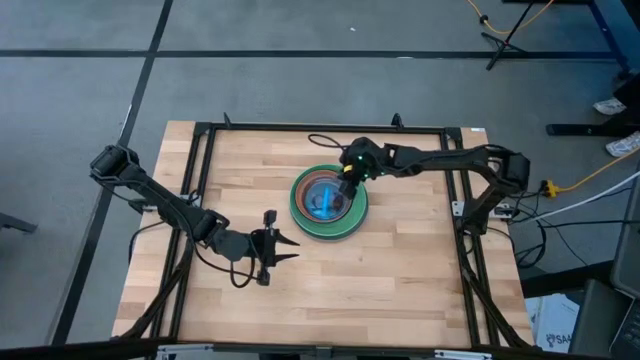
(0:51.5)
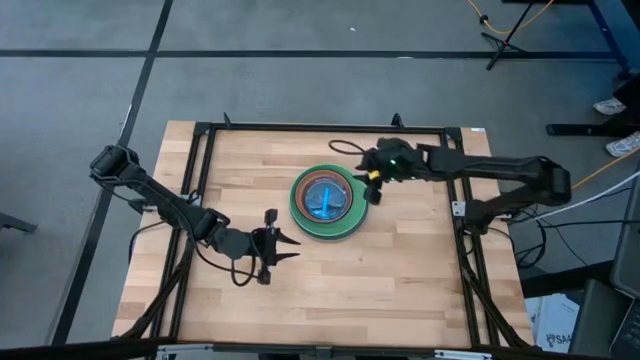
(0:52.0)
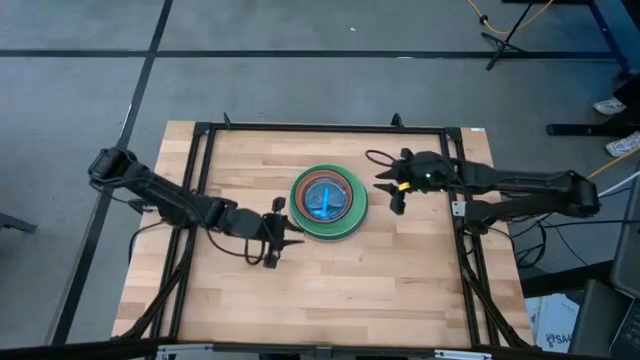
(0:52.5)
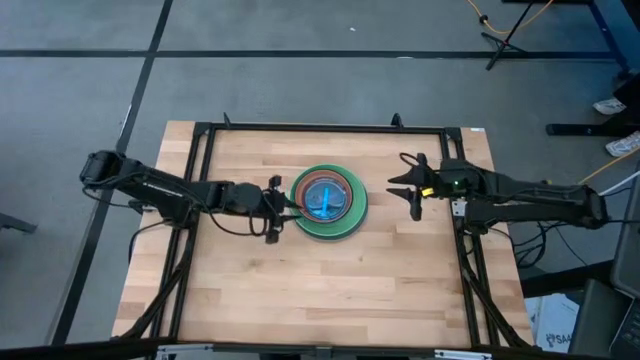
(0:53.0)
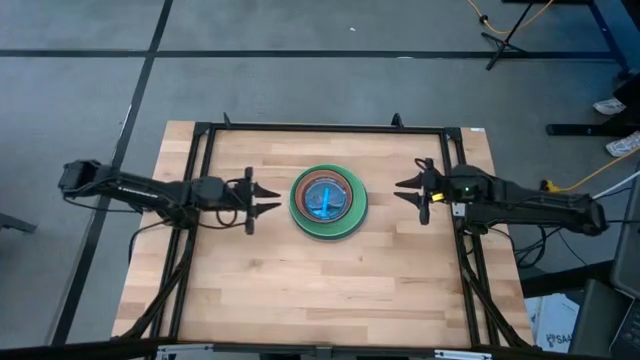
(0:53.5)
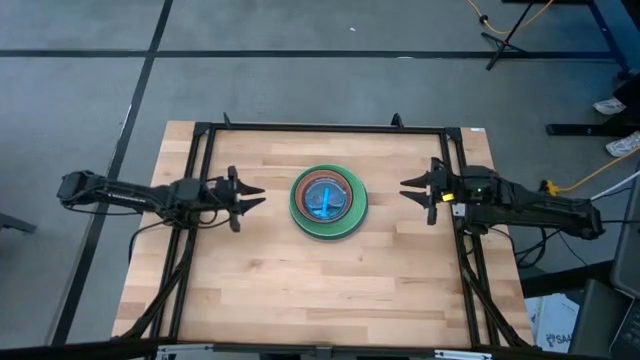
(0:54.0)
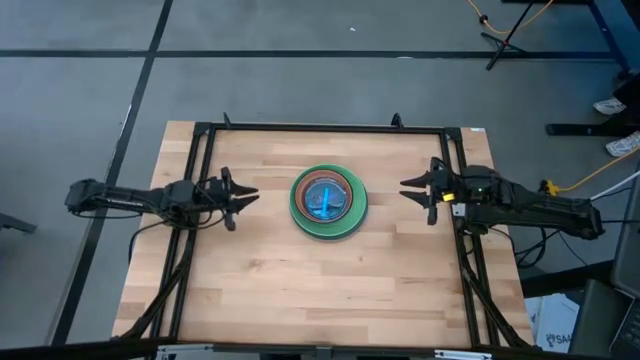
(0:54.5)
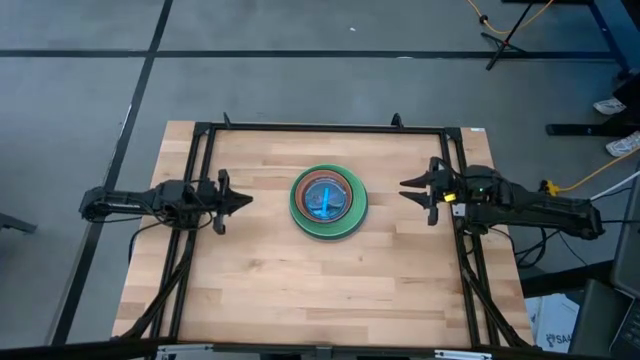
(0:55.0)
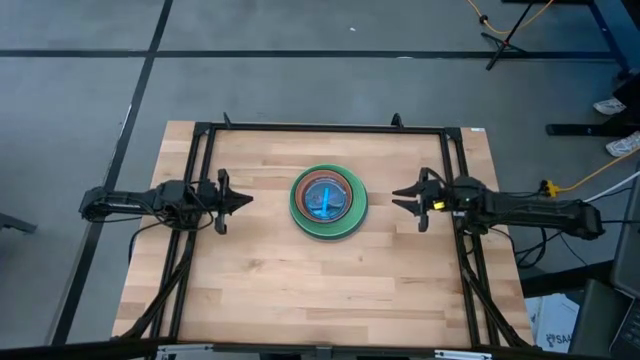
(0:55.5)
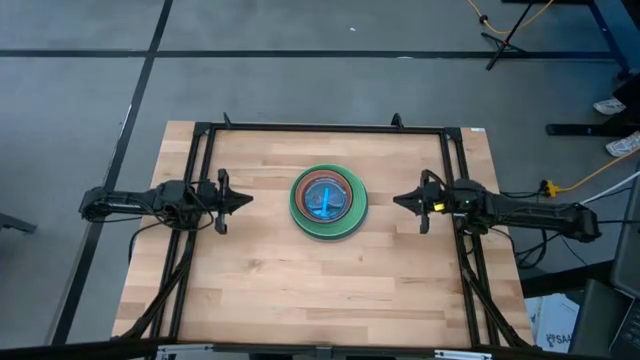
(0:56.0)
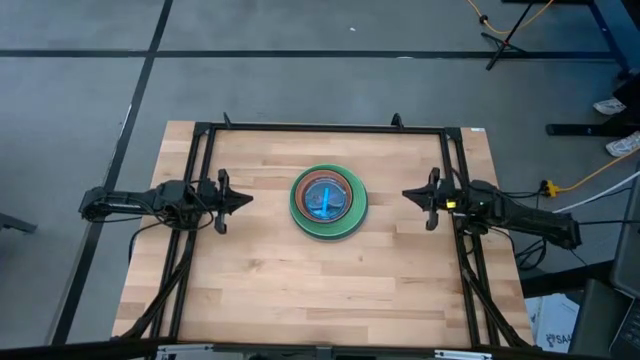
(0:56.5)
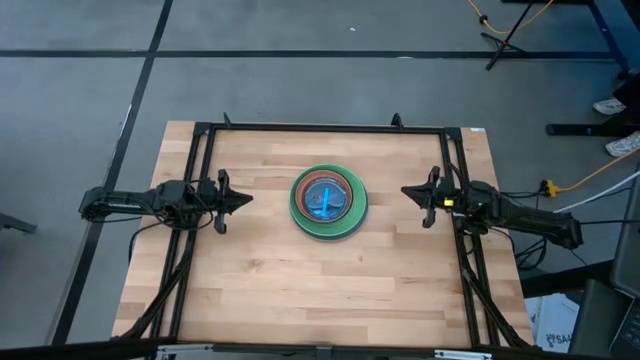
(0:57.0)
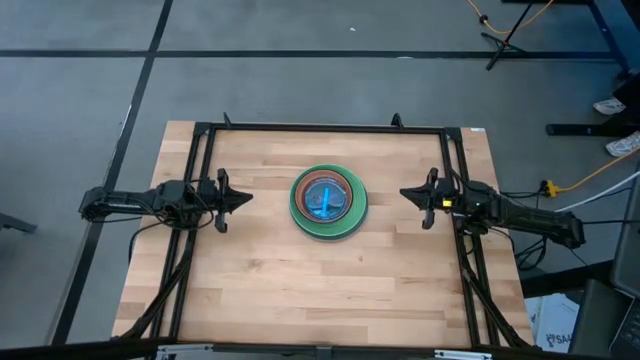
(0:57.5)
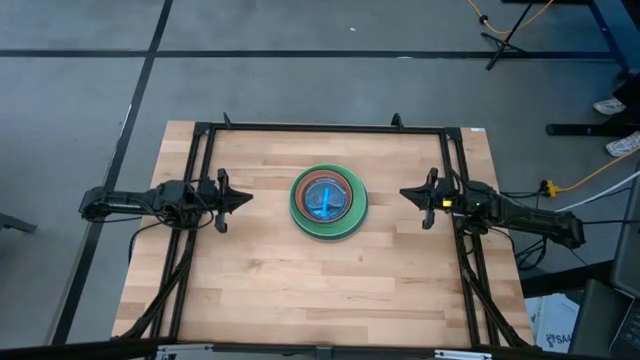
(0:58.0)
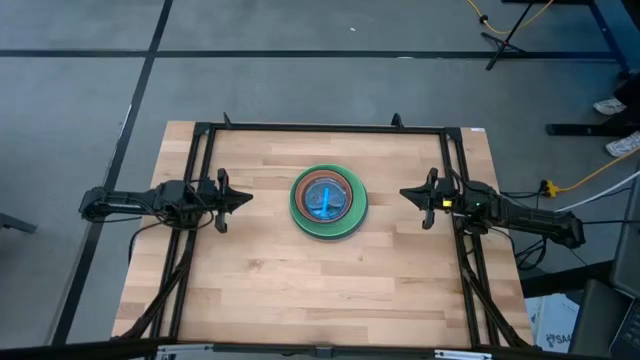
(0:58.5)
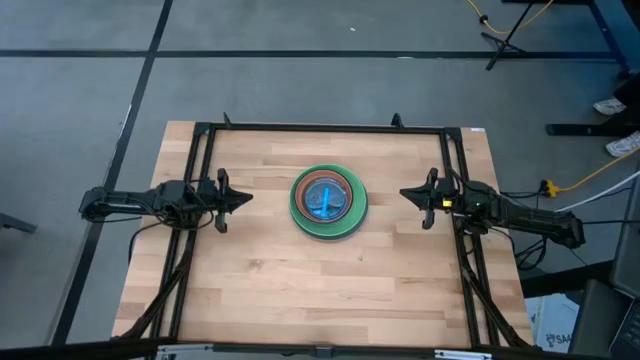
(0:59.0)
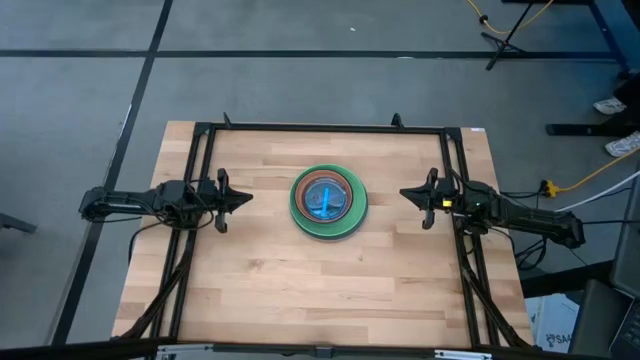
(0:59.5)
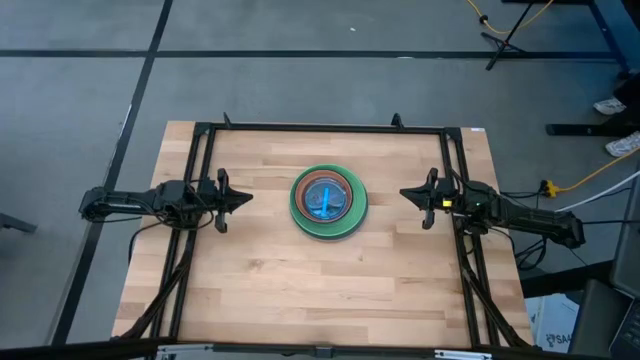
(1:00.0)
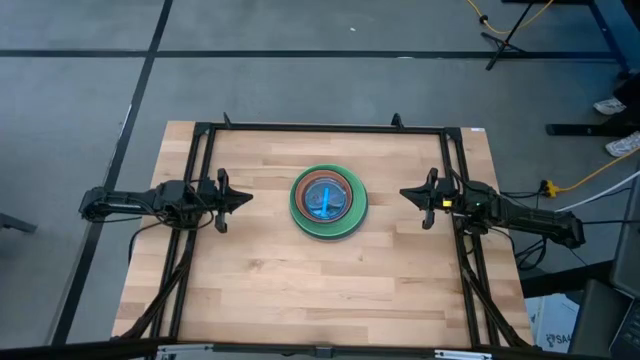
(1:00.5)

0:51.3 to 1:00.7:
Task: Stack plastic plates
Return to Home Position

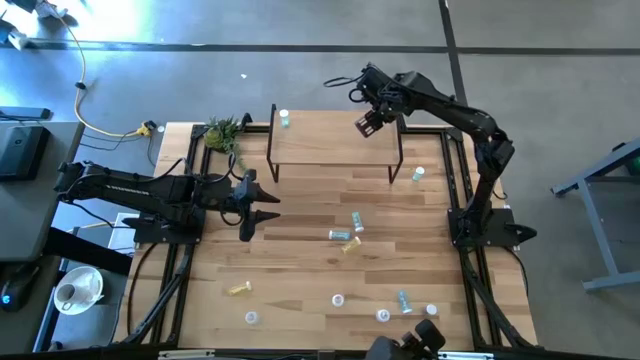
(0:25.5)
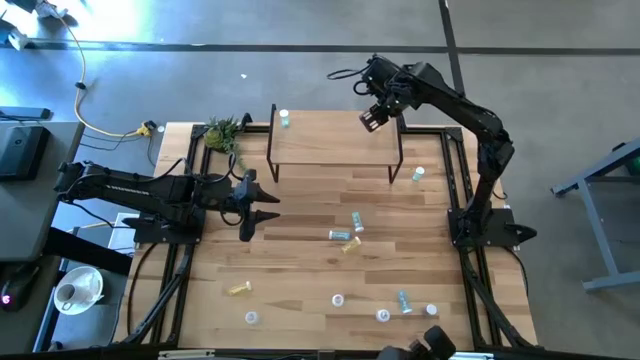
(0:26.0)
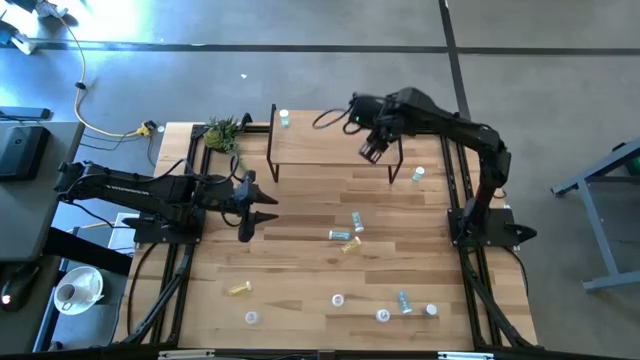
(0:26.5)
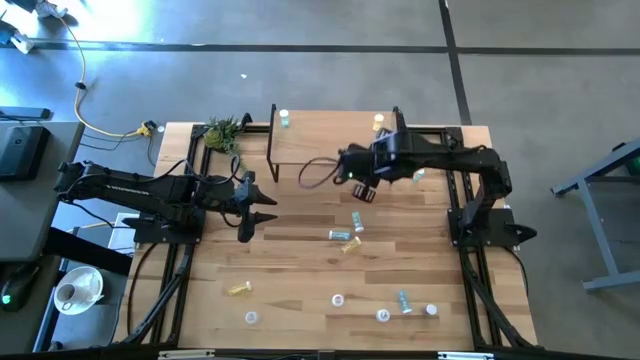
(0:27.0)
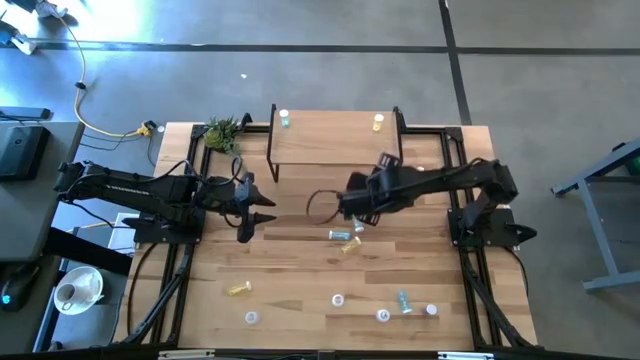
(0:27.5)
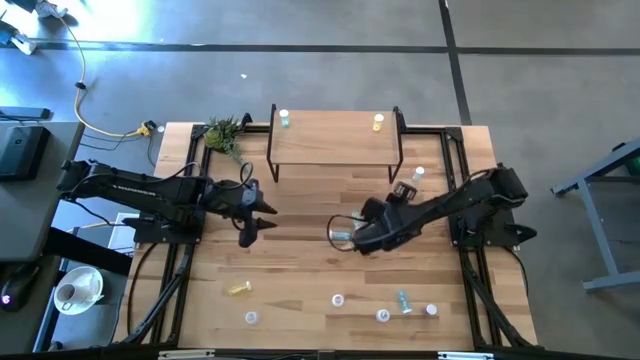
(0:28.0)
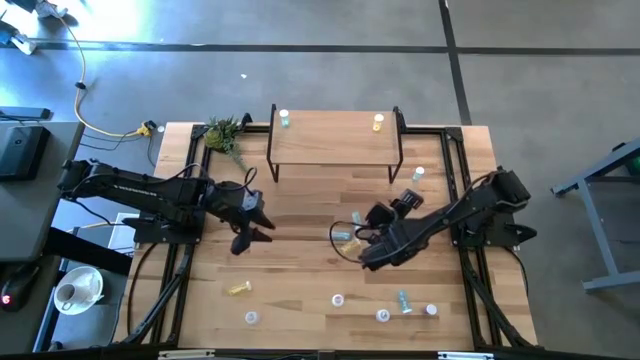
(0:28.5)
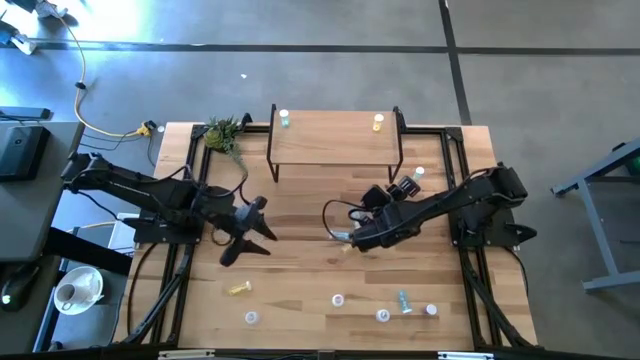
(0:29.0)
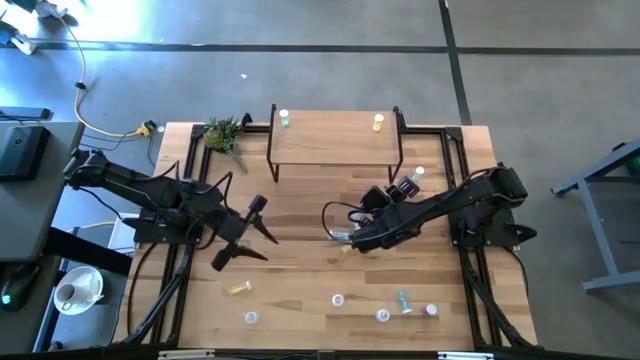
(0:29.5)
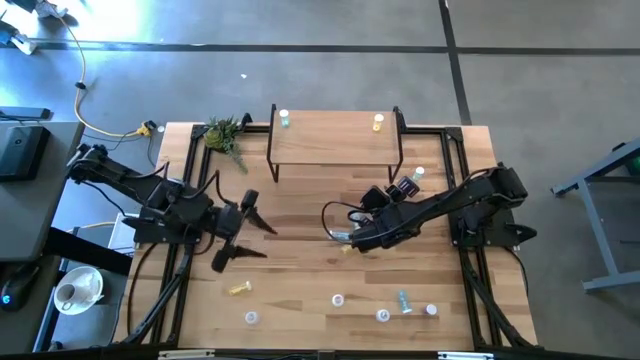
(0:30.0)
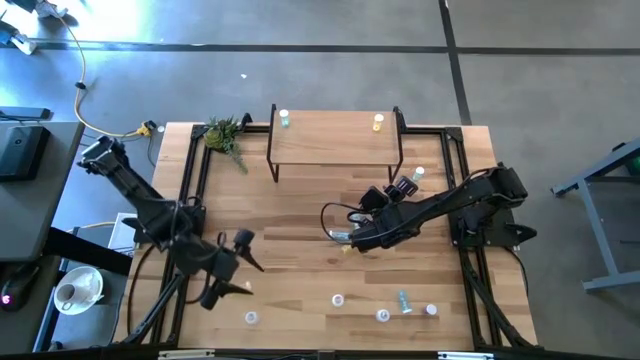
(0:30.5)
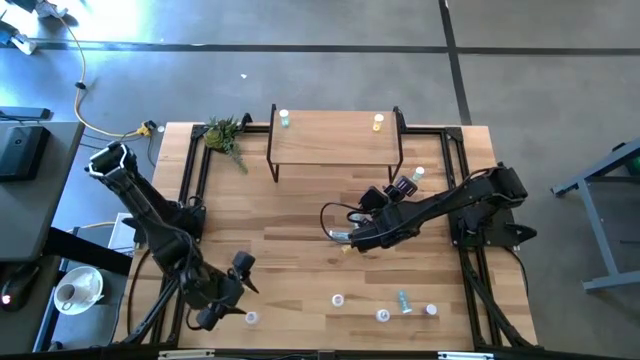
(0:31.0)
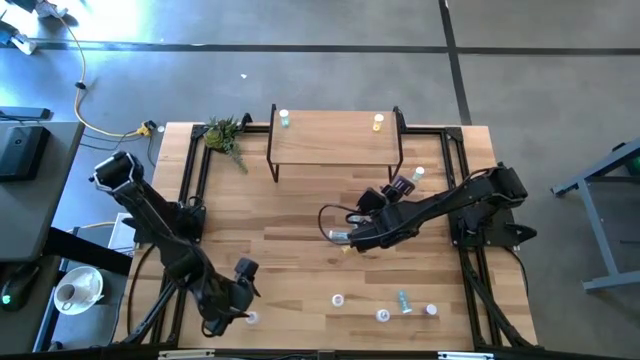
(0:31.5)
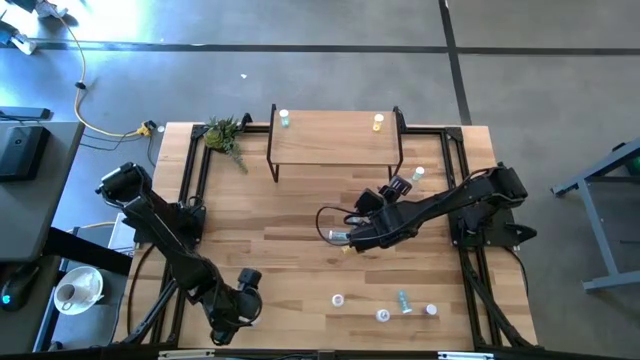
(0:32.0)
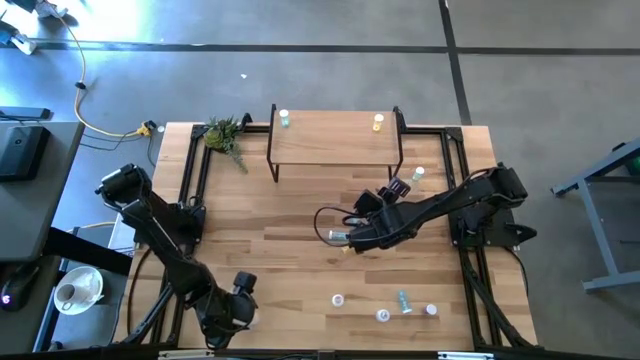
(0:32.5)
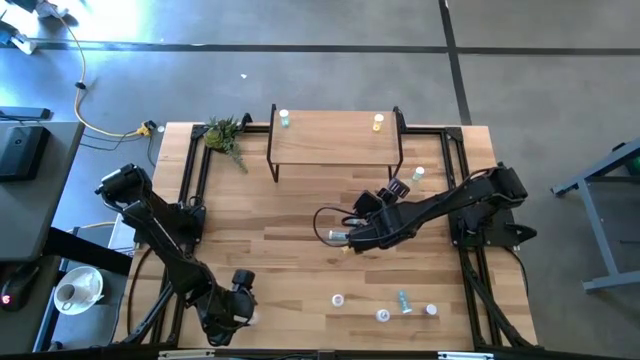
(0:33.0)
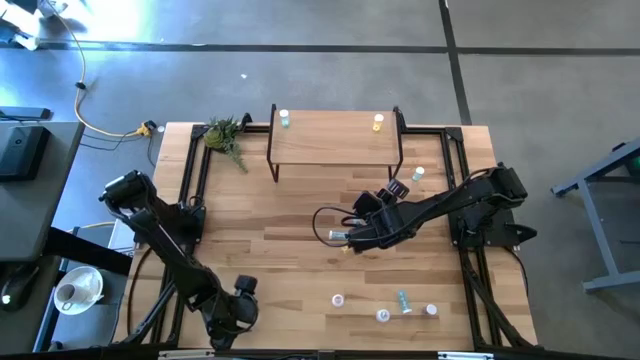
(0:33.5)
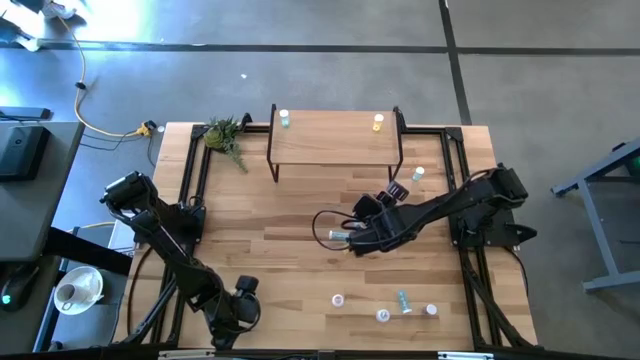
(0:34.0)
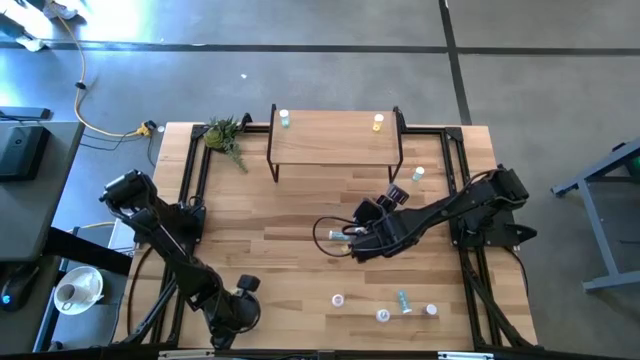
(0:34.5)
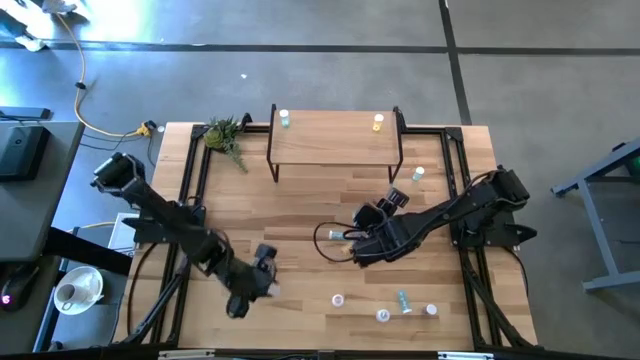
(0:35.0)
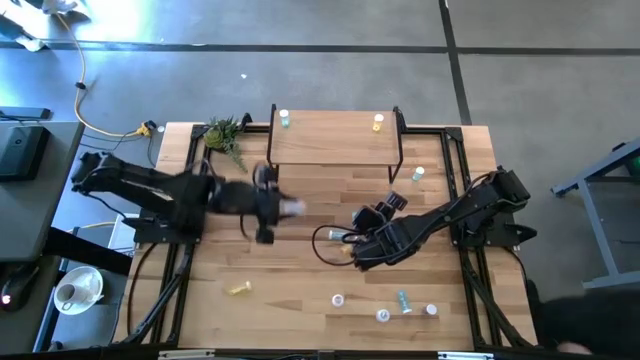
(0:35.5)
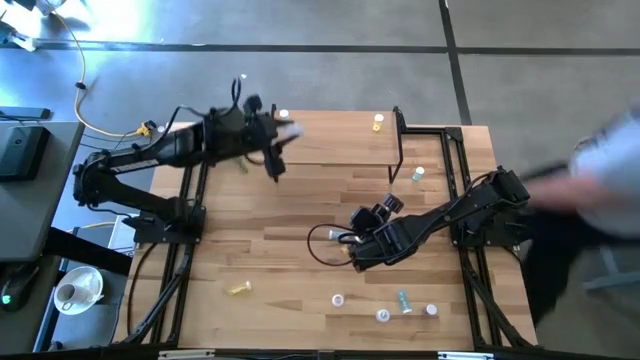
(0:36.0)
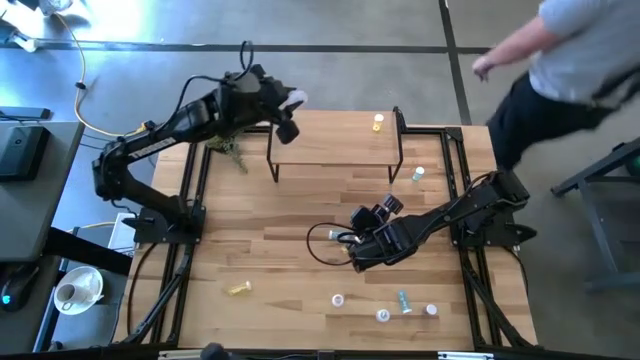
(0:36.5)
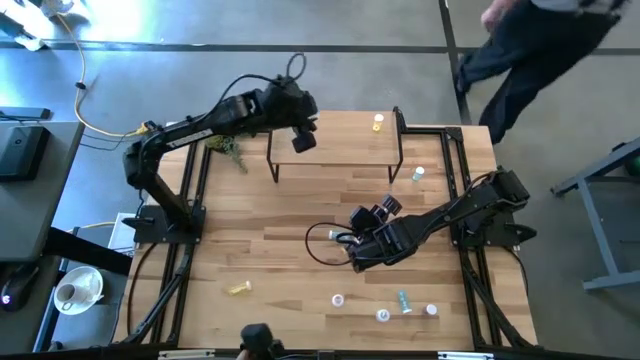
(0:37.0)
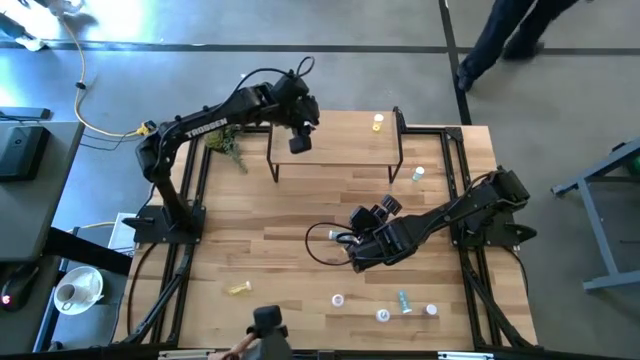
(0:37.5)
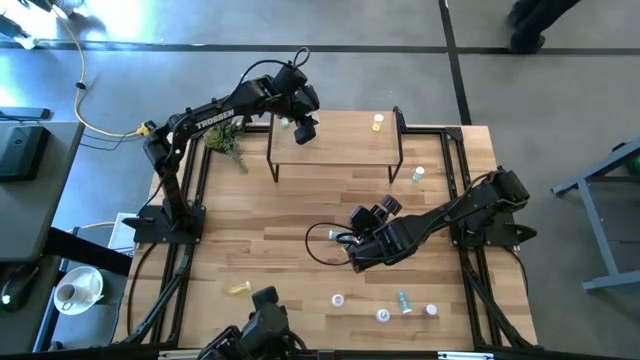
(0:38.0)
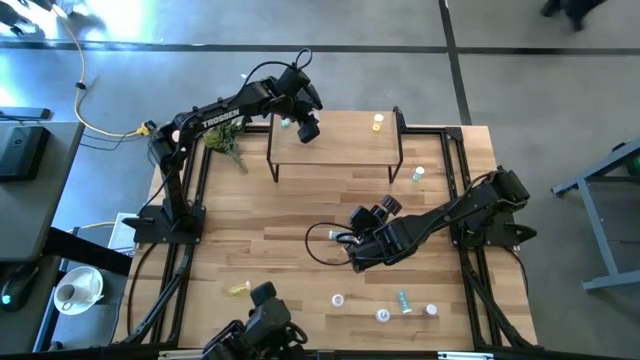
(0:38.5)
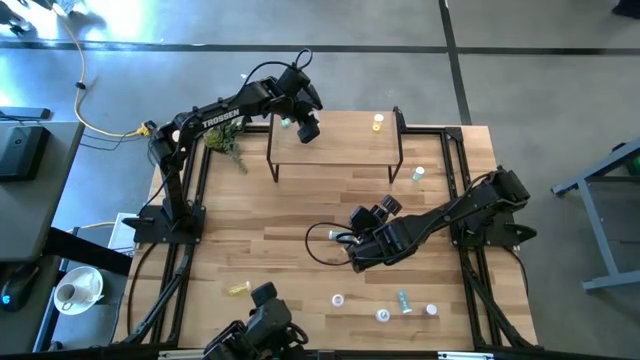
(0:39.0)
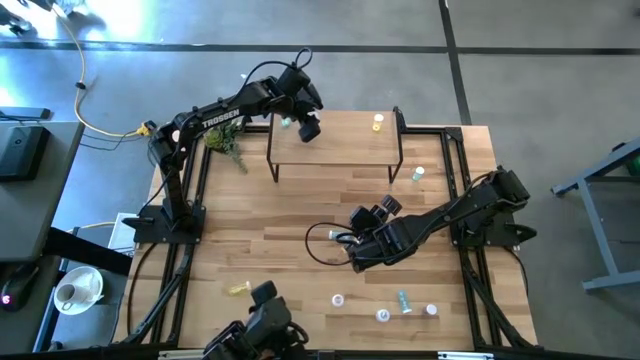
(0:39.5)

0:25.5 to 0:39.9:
Task: Pick and place medicine bottles onto shelf by color
Put the left transparent pill bottle on the shelf
